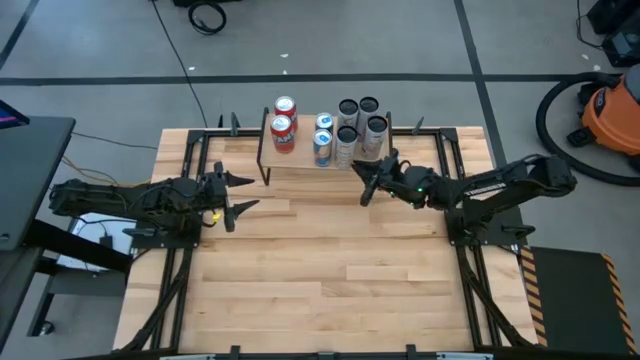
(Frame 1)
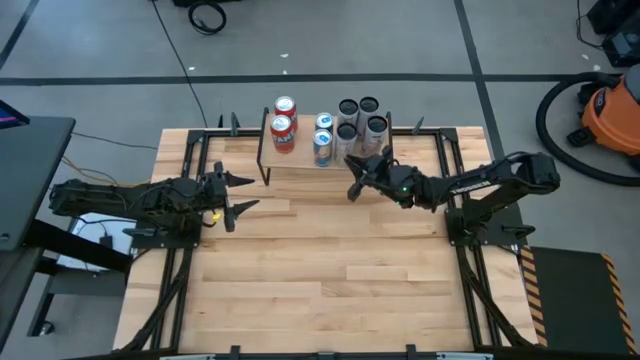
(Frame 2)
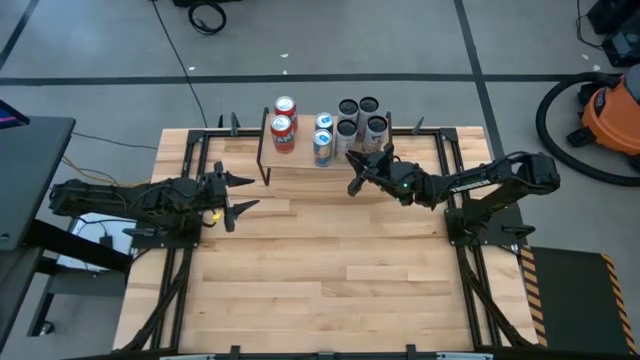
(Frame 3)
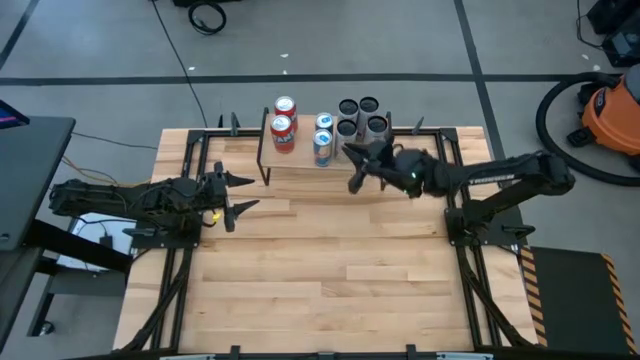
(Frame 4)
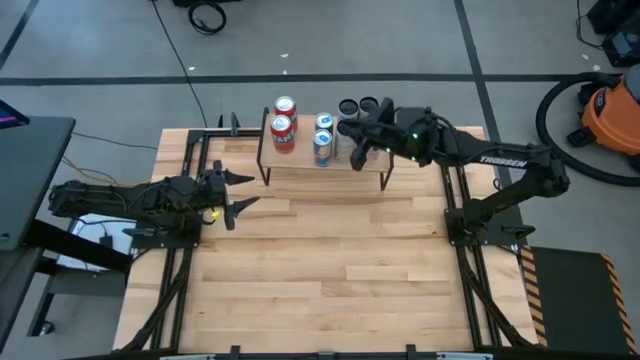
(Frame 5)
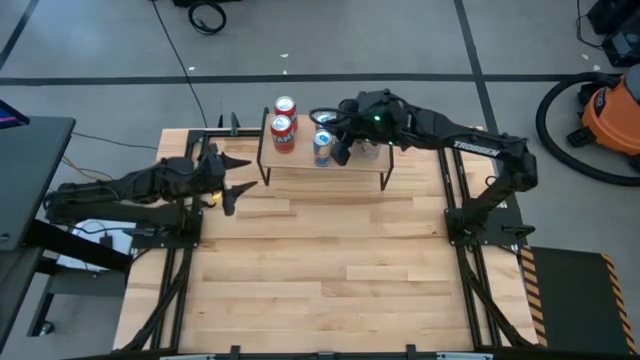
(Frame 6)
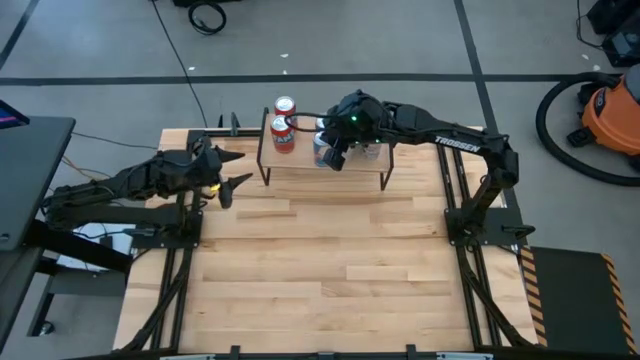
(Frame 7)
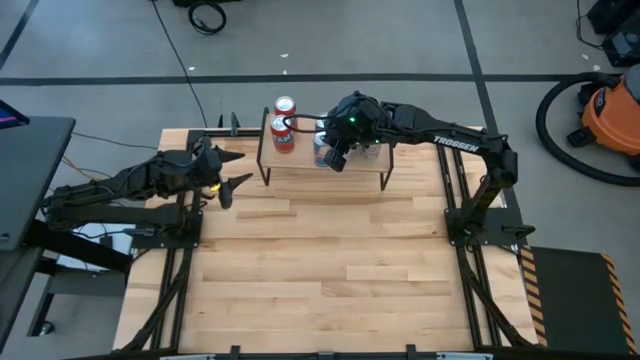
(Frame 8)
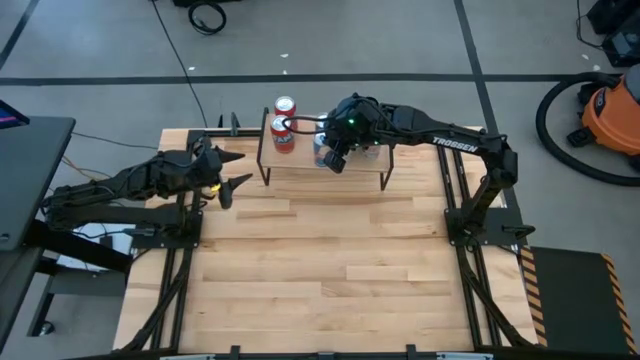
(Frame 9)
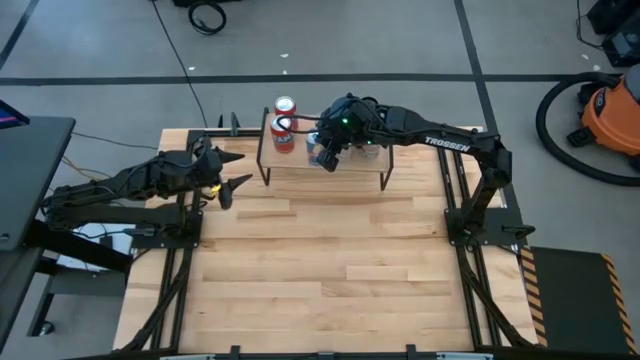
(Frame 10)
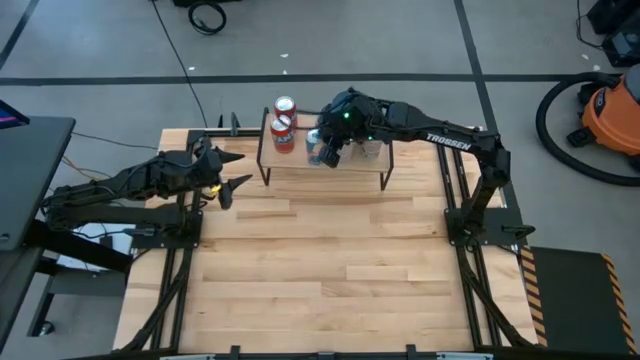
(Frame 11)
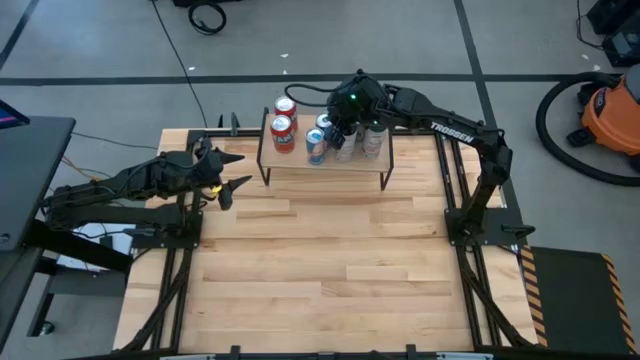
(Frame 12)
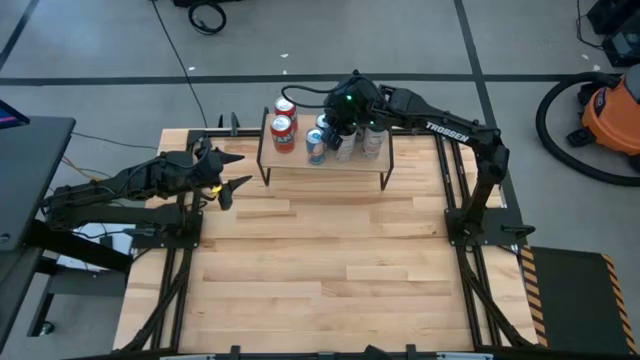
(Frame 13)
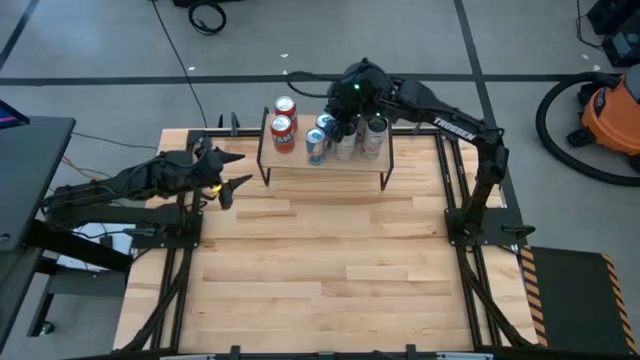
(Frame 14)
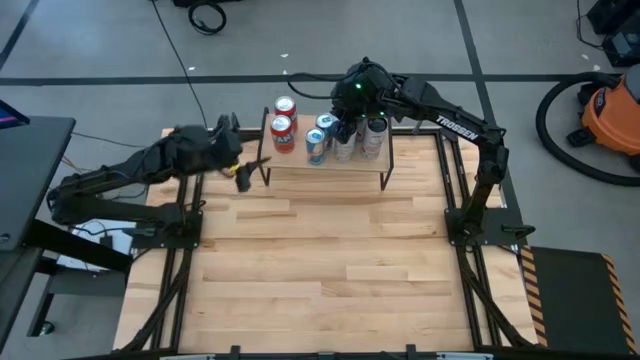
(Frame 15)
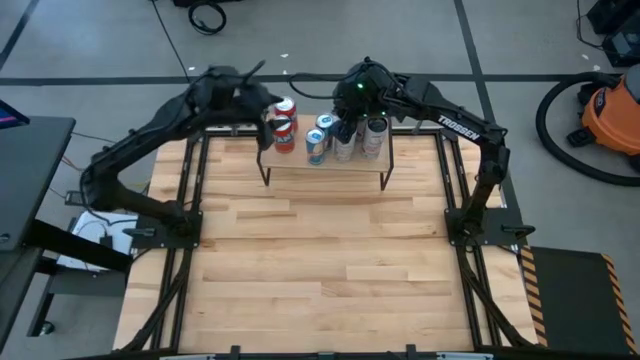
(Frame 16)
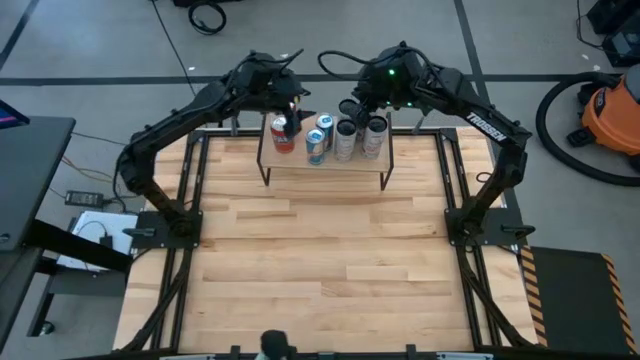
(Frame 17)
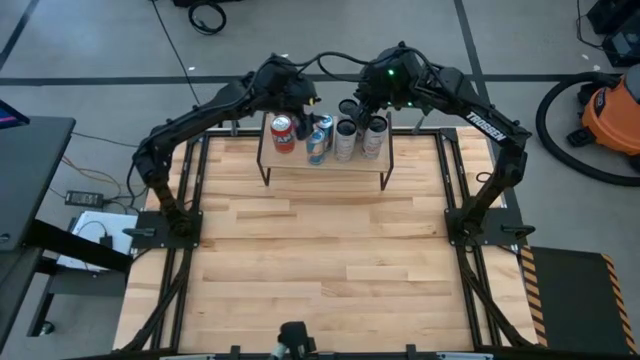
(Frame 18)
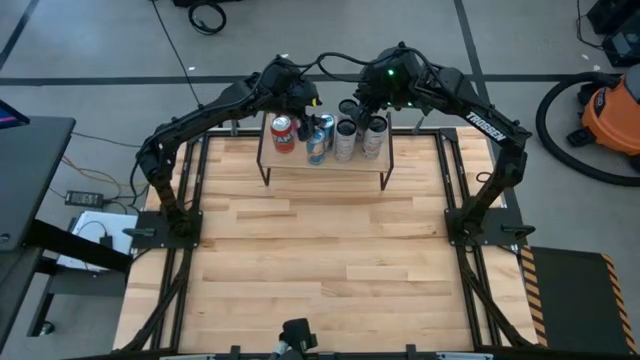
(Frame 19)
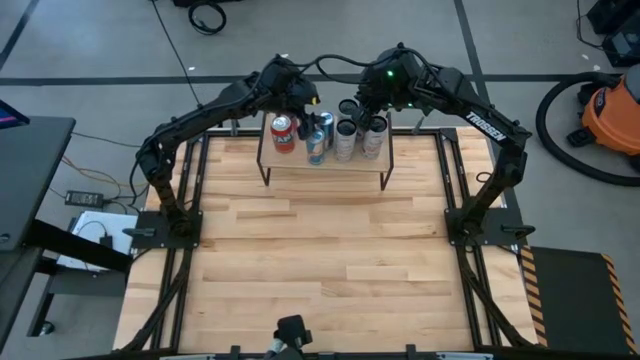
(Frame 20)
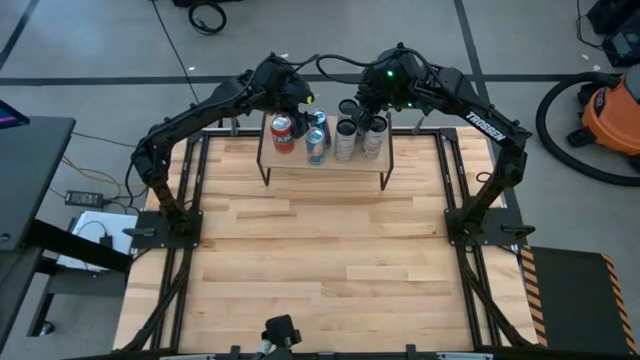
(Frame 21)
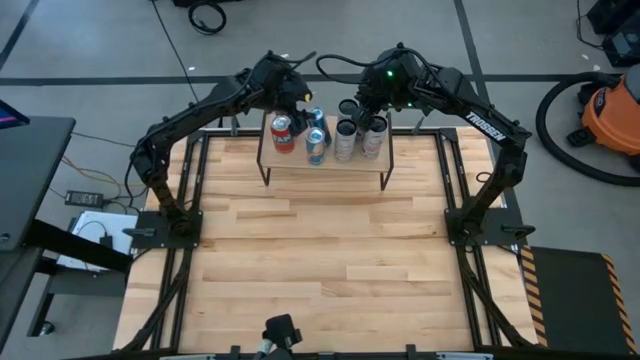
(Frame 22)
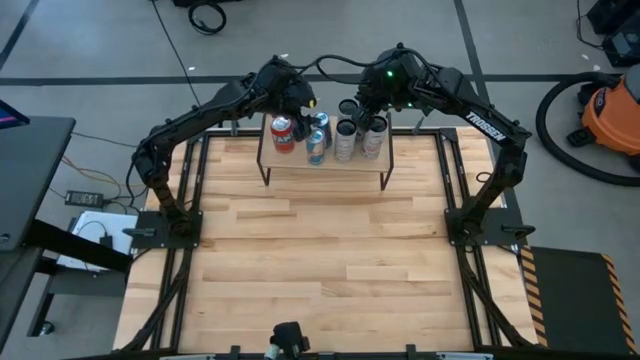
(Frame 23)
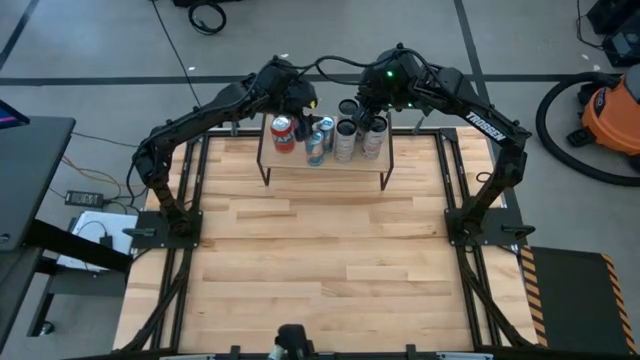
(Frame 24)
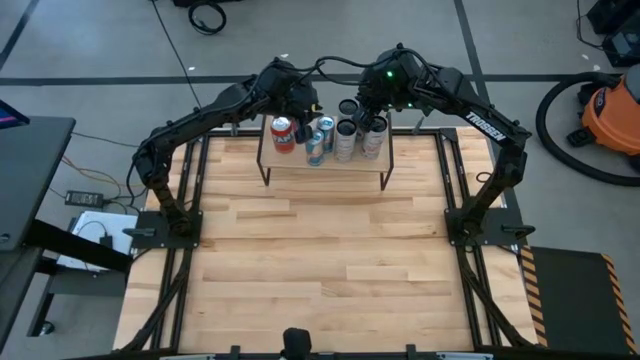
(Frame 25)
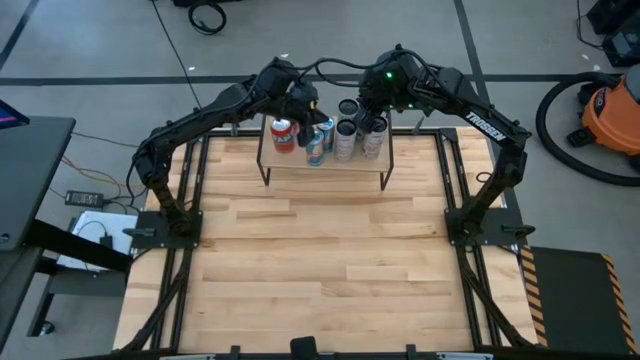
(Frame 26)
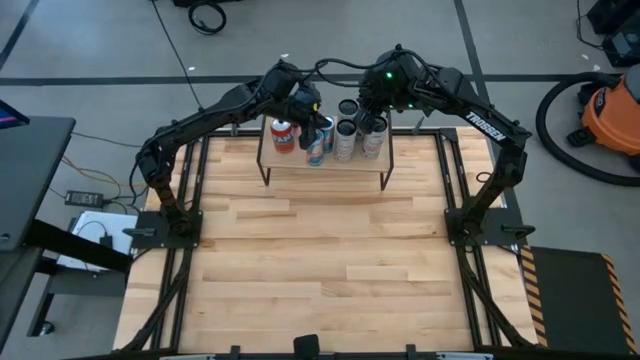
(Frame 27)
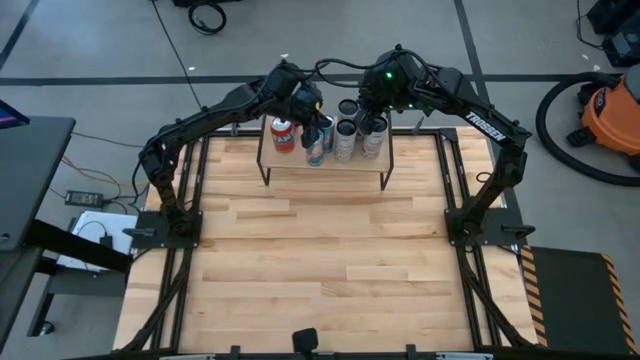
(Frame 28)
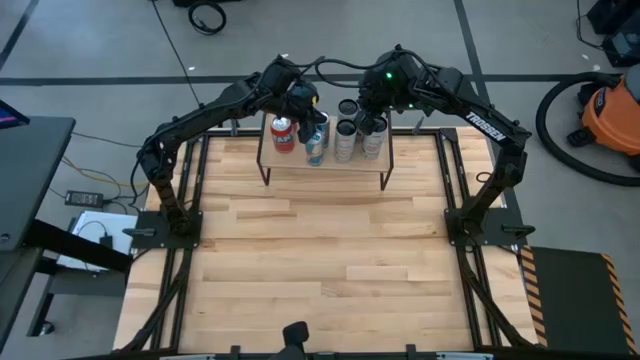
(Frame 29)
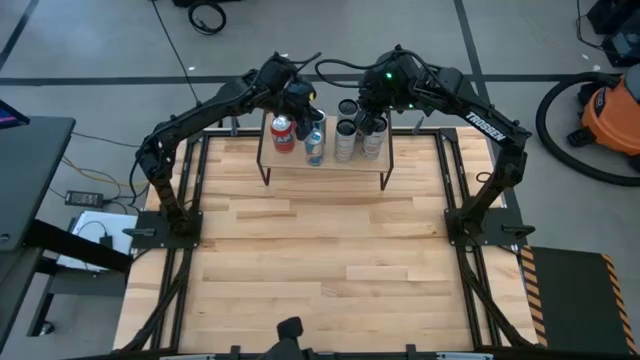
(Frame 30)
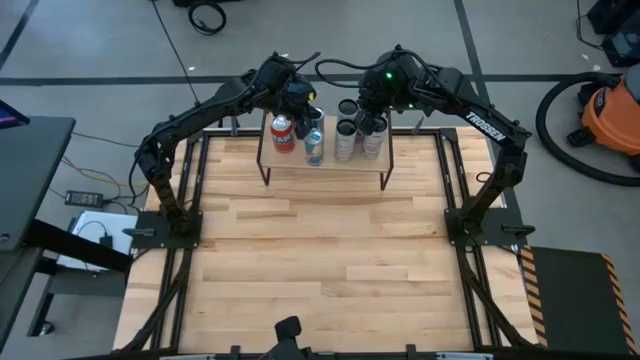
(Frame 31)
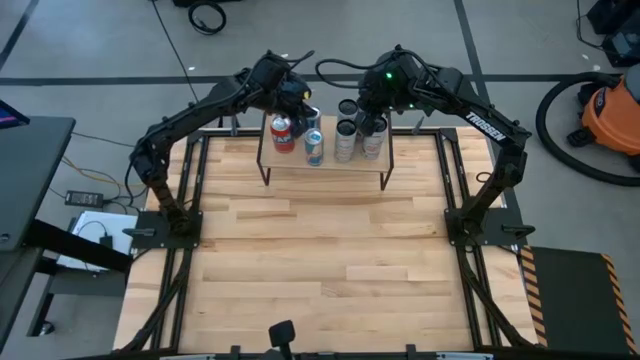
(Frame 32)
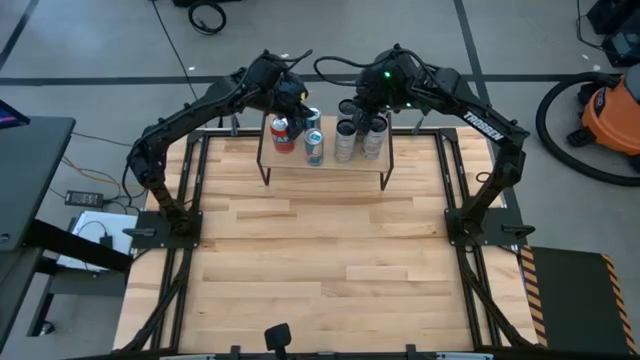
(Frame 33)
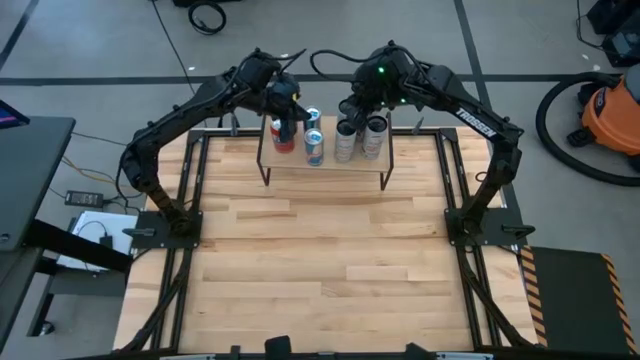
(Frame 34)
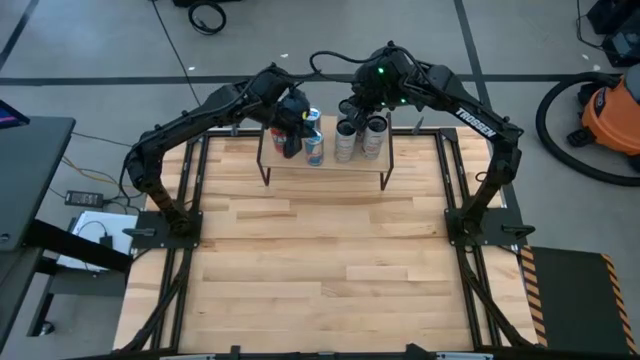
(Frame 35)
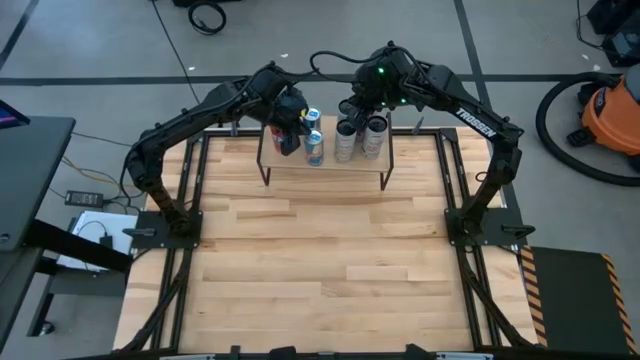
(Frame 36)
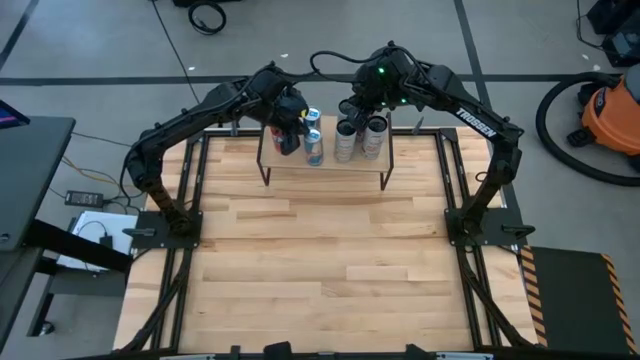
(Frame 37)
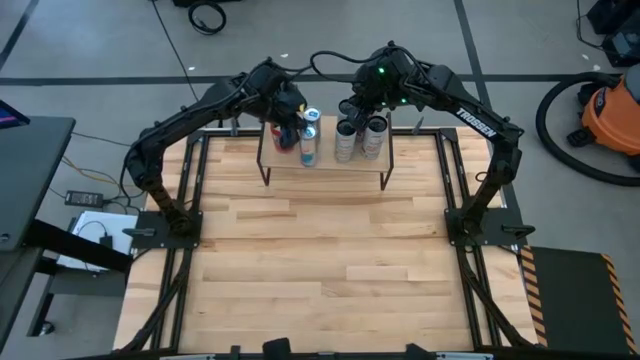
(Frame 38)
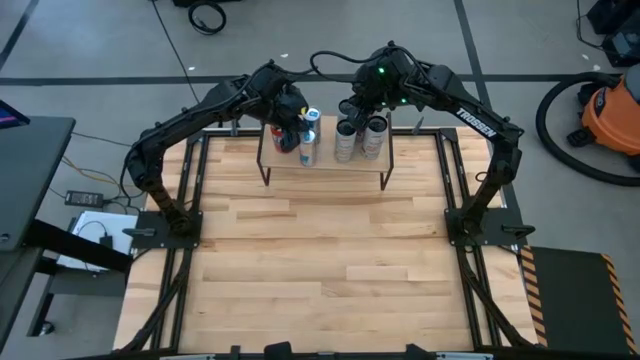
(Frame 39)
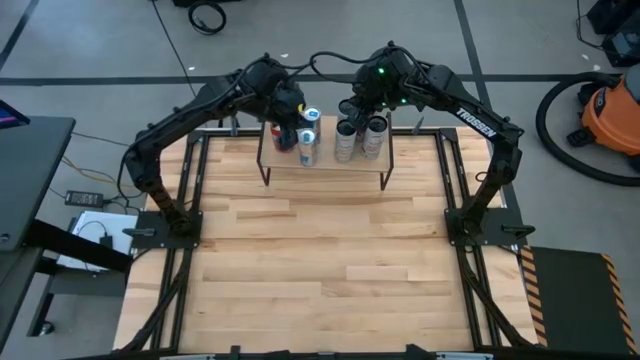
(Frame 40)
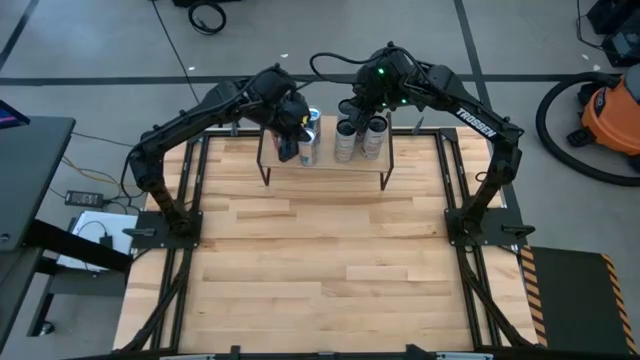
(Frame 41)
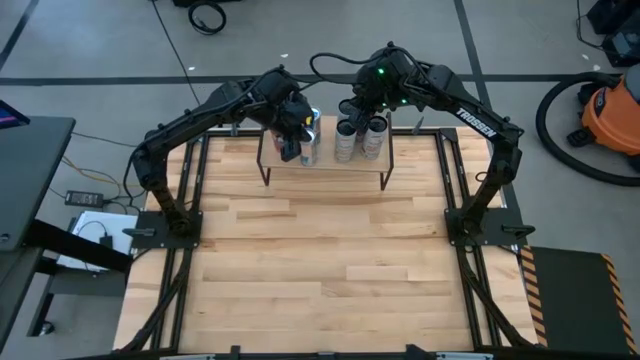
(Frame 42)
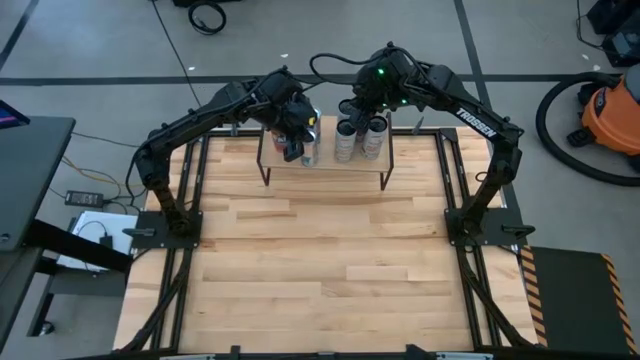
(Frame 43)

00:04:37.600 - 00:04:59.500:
Task: Place canned beverage on shelf
Adjust the soda cans on the shelf
